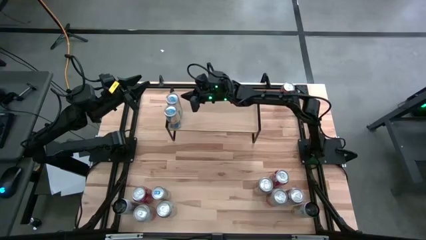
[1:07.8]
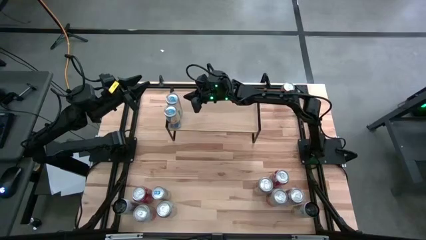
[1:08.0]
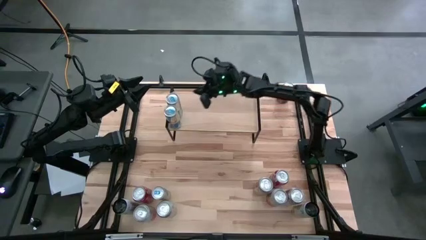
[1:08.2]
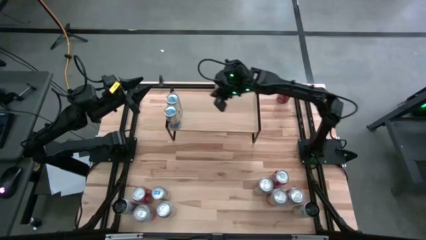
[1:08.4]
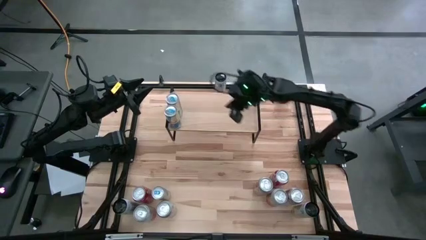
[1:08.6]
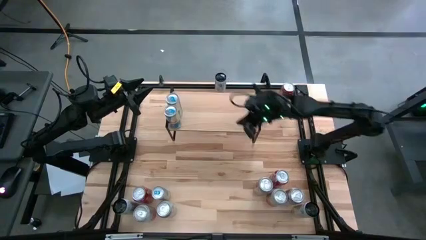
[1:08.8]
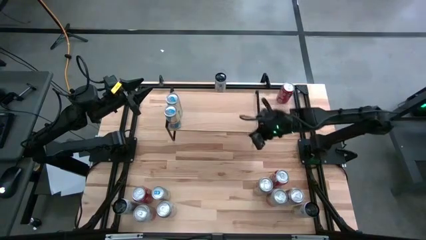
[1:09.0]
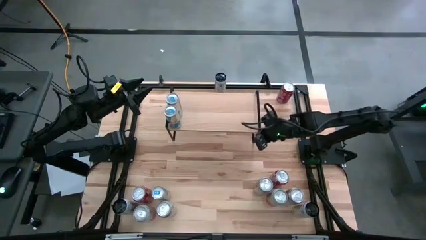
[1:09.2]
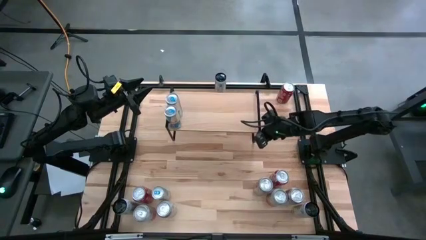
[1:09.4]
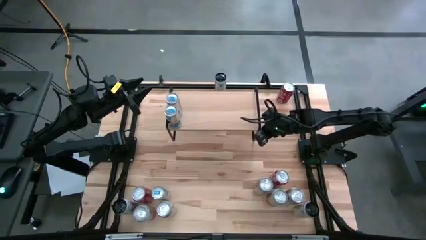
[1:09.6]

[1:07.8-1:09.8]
Task: Place canned beverage on shelf
Adjust the shelf

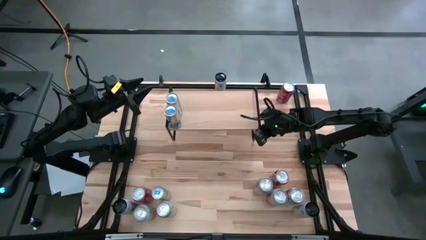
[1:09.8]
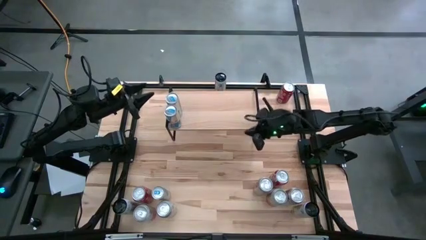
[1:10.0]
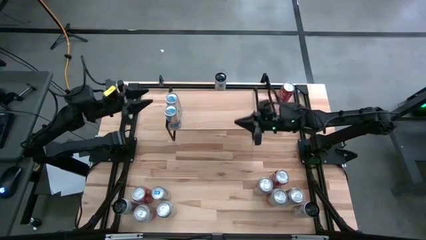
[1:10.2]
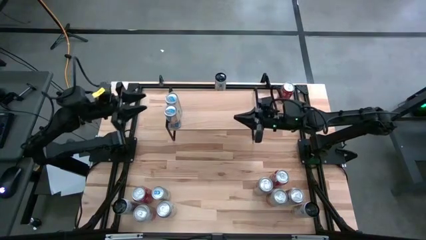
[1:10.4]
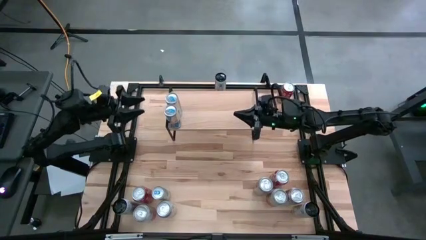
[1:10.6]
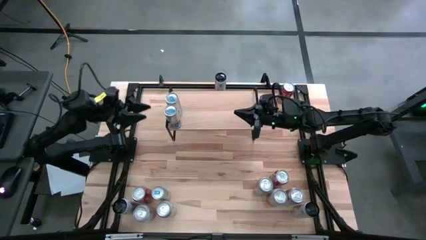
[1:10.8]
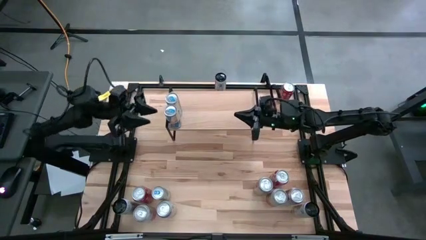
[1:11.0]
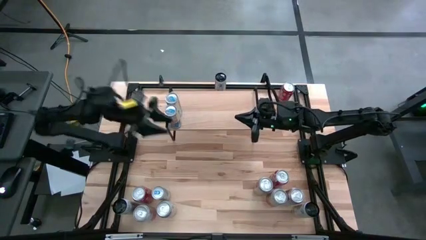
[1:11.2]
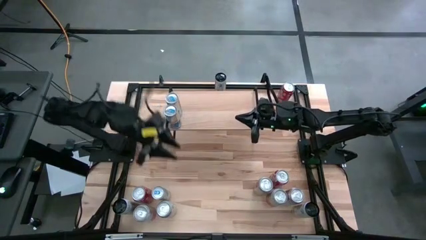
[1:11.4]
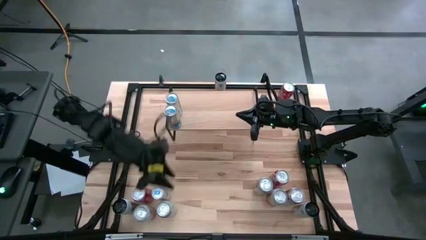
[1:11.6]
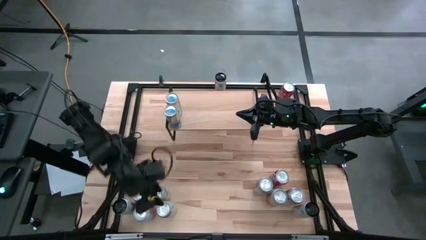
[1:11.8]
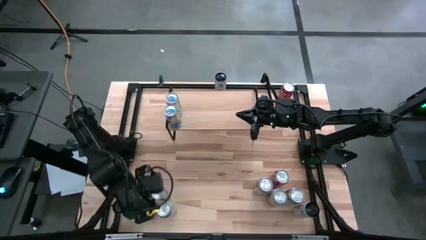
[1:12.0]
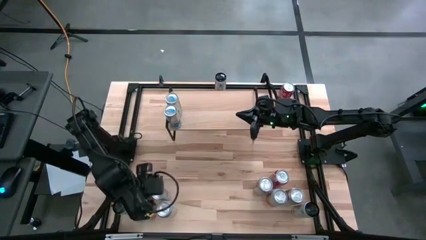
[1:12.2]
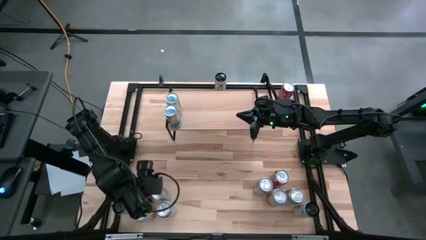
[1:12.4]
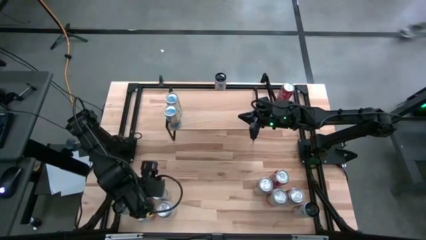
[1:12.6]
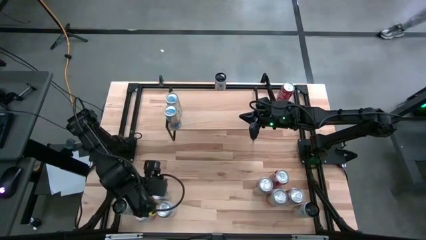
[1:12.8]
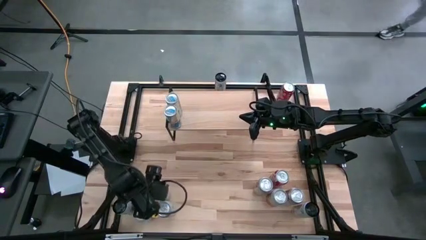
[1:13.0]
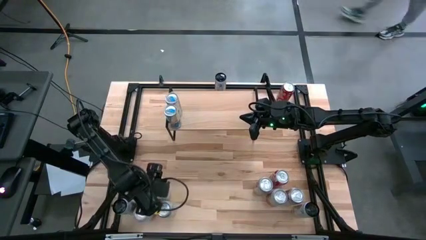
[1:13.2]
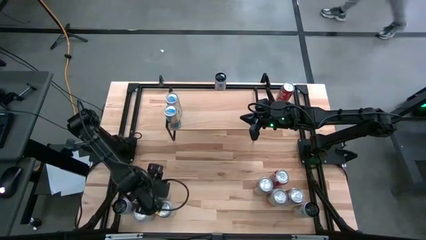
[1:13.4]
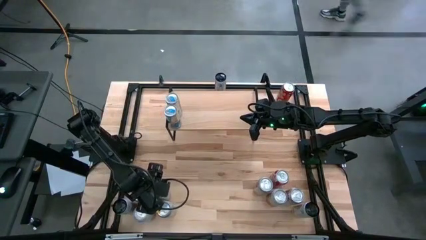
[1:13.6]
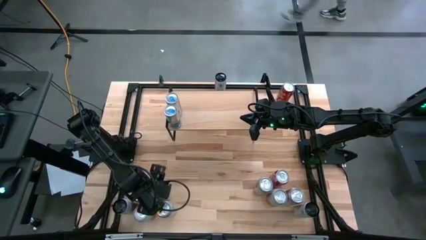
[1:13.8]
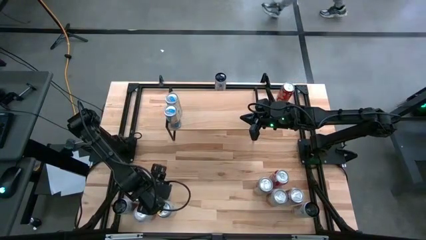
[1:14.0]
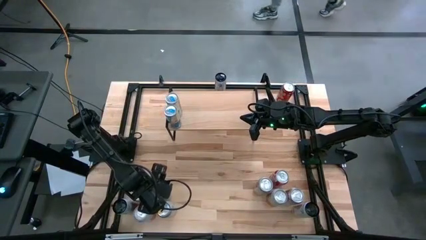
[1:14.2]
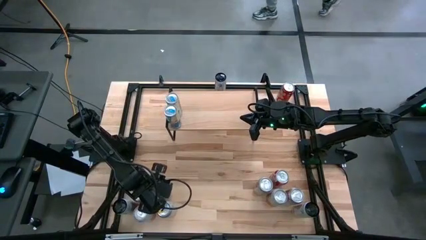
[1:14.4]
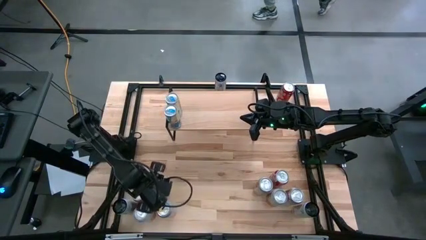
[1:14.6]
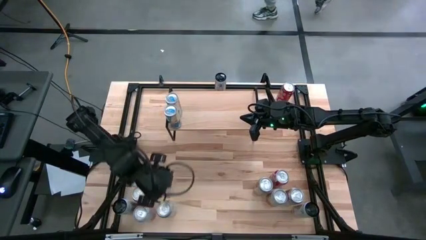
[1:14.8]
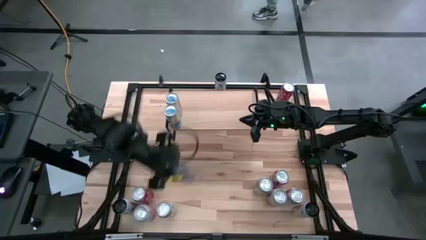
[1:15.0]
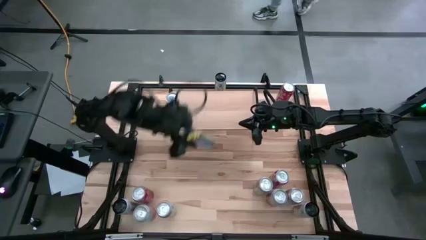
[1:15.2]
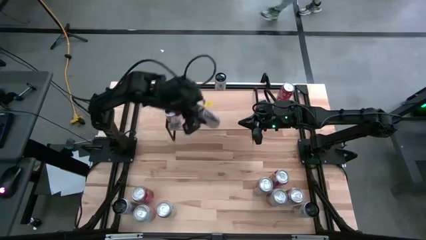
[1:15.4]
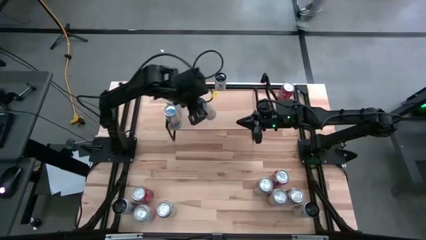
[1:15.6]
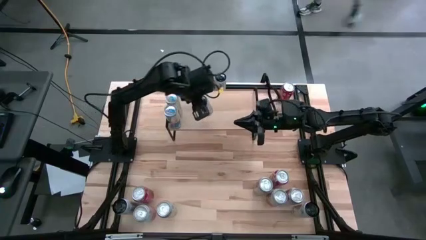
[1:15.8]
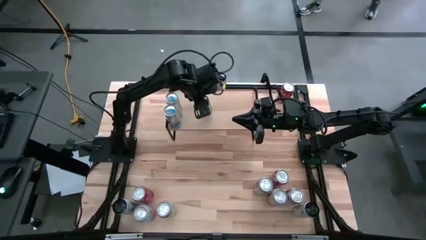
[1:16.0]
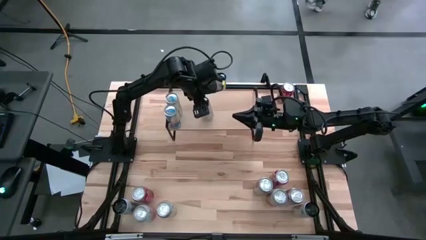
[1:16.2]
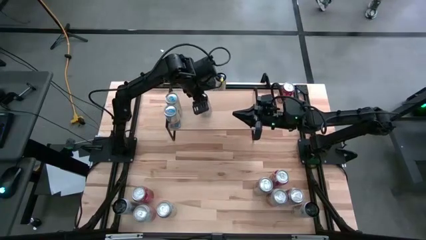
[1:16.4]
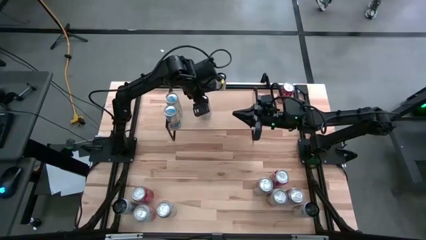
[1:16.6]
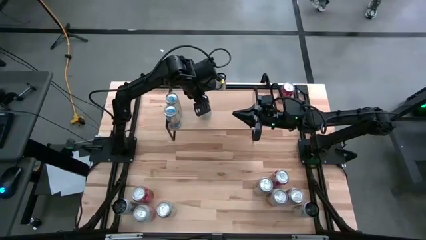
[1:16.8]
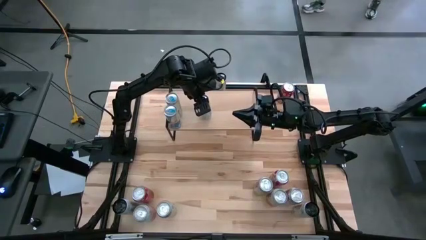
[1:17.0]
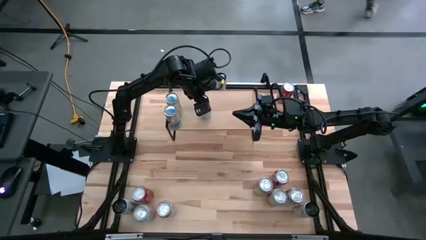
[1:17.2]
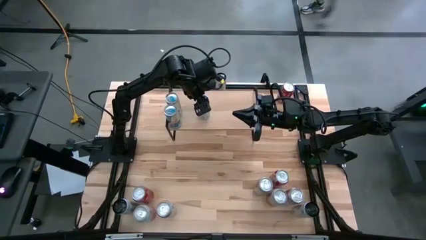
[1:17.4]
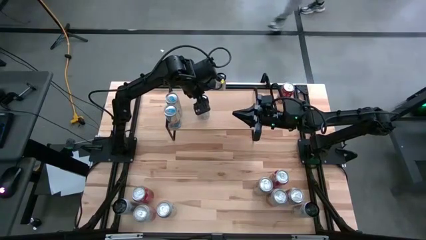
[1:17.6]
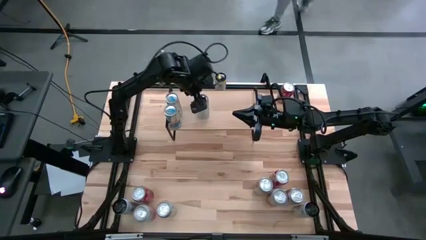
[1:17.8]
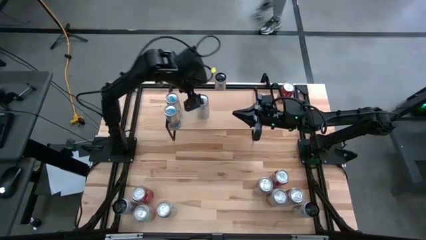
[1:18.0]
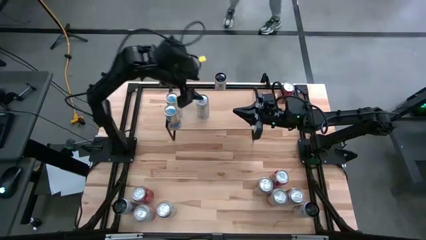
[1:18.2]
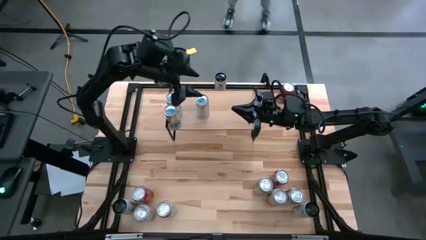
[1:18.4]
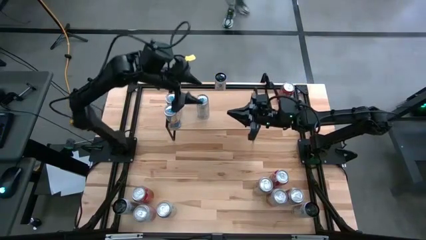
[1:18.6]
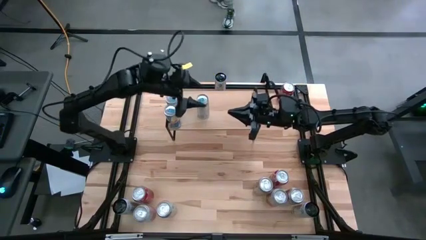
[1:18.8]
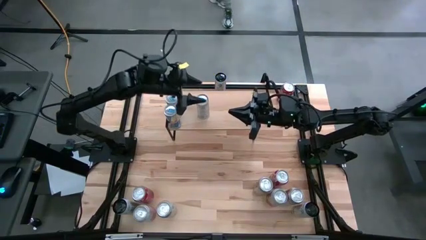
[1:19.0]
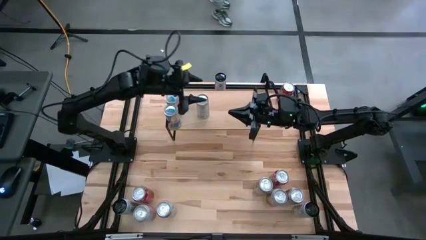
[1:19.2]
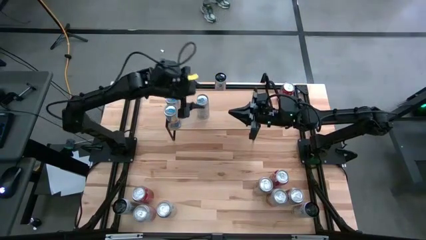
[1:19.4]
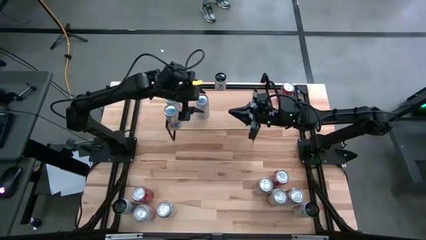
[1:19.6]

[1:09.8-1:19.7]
Put the blue soda can aligned with the other blue soda cans on the shelf
